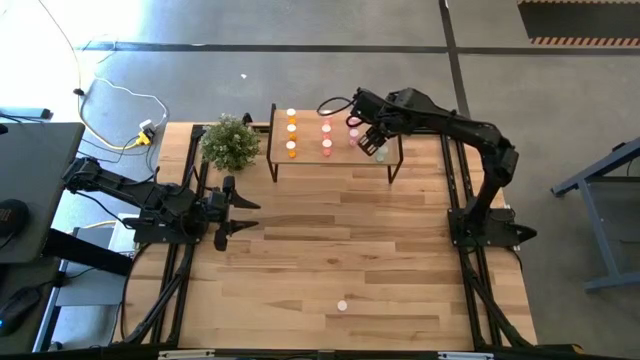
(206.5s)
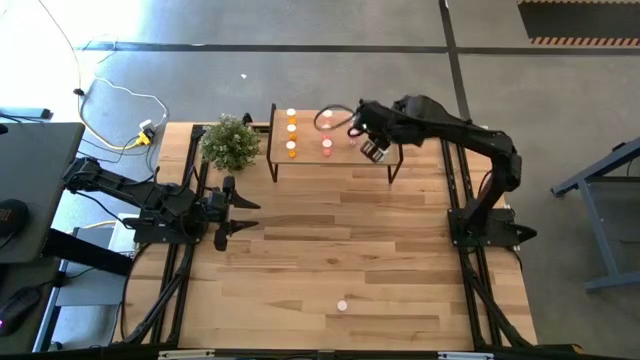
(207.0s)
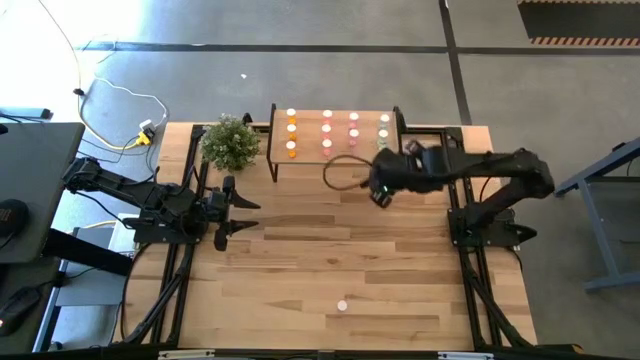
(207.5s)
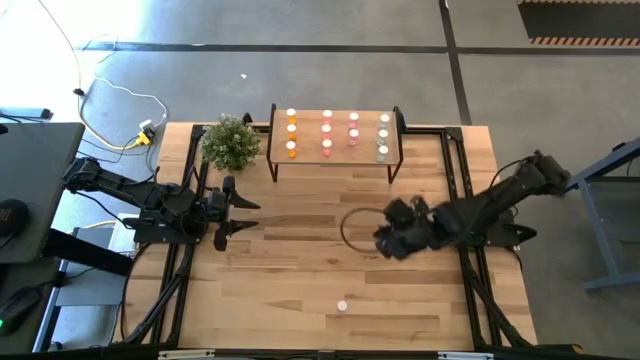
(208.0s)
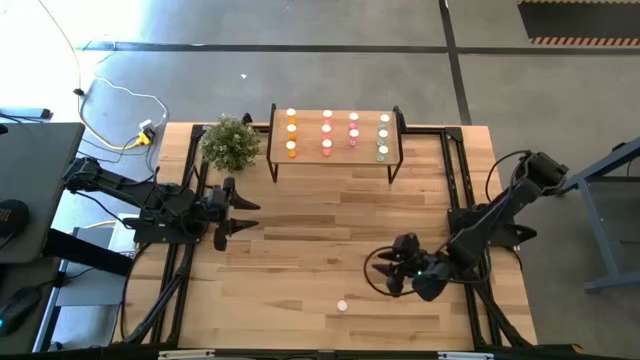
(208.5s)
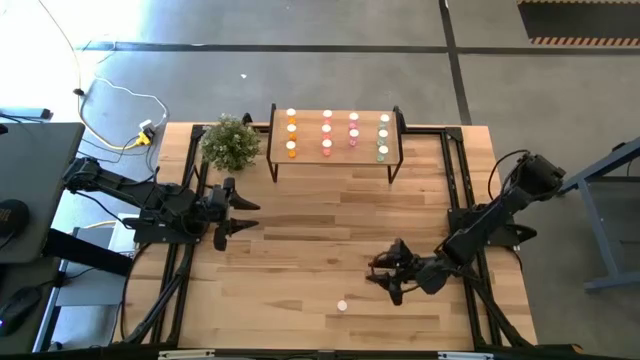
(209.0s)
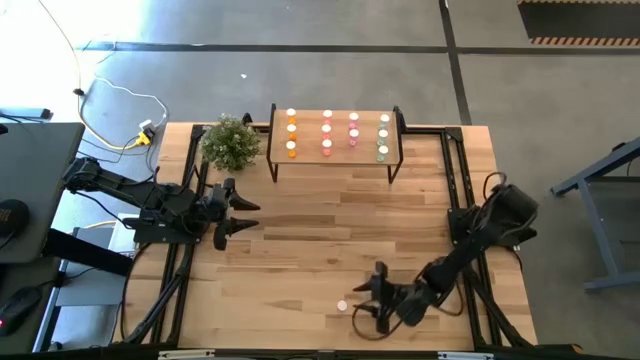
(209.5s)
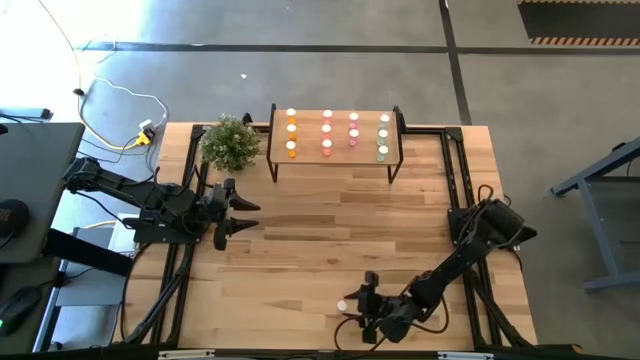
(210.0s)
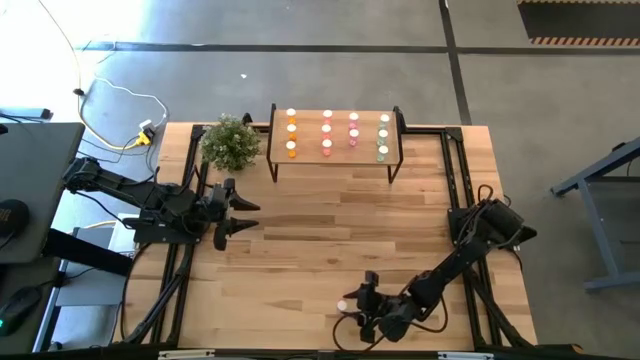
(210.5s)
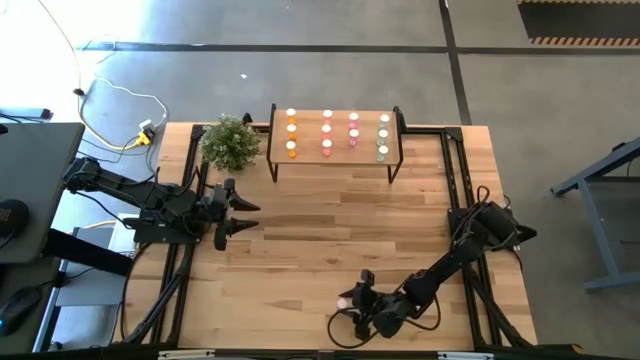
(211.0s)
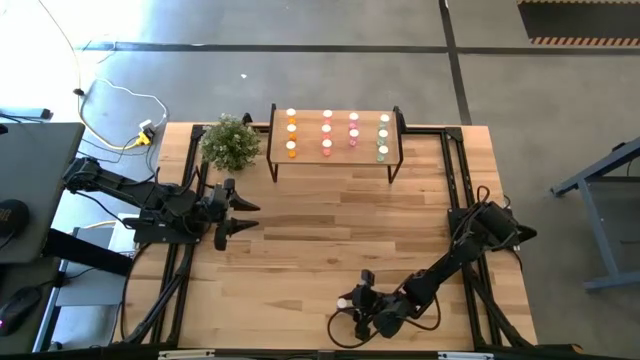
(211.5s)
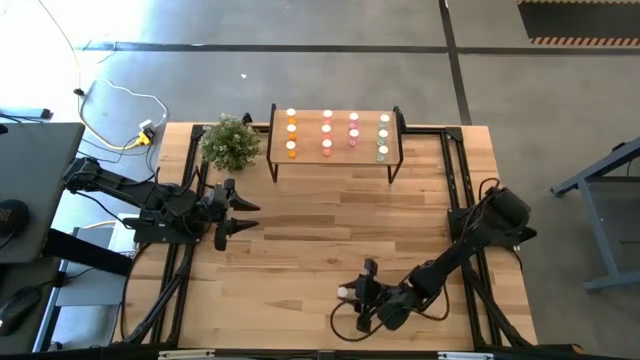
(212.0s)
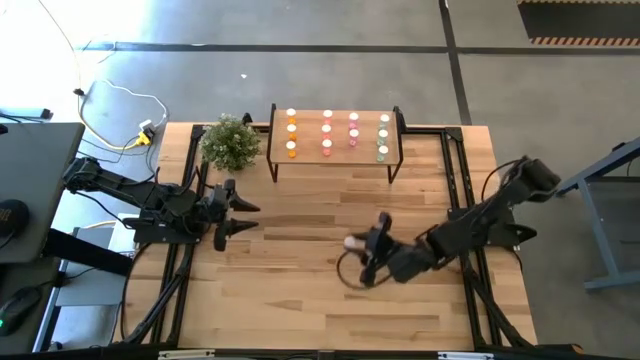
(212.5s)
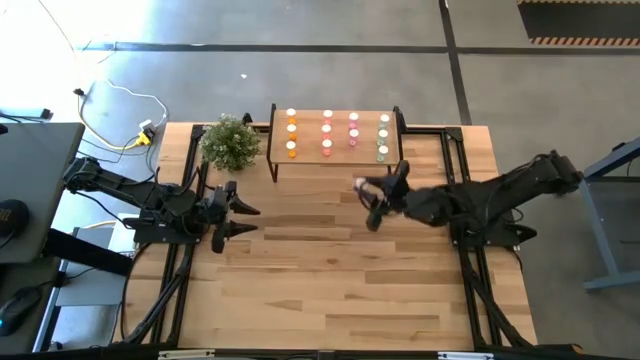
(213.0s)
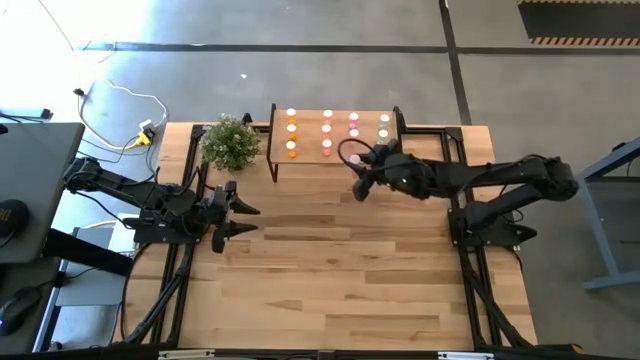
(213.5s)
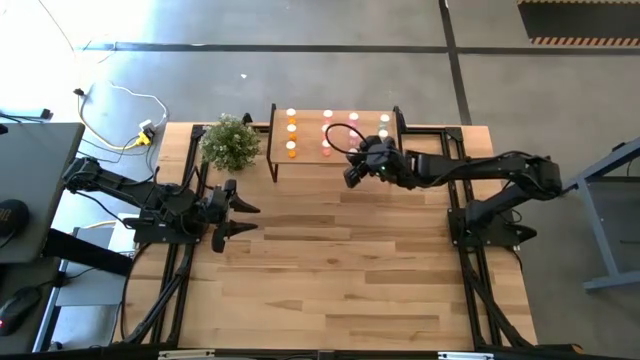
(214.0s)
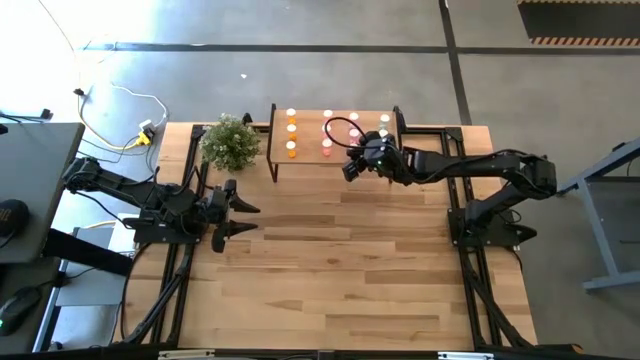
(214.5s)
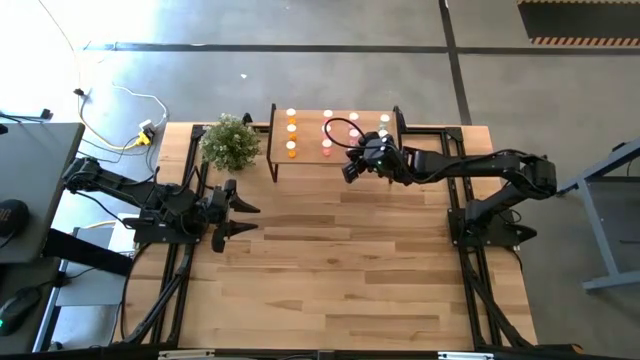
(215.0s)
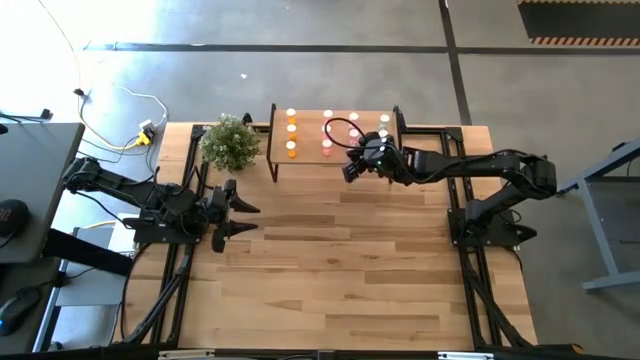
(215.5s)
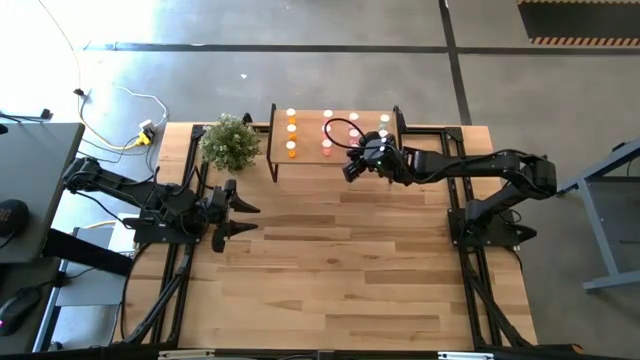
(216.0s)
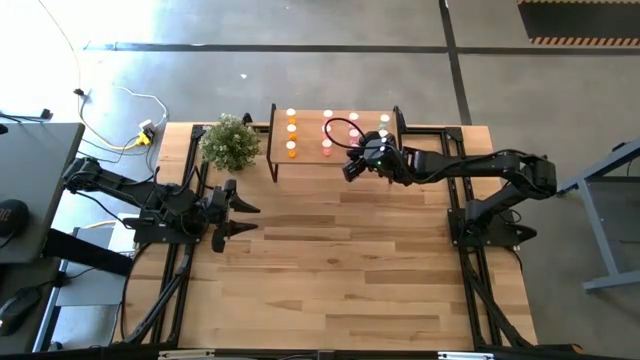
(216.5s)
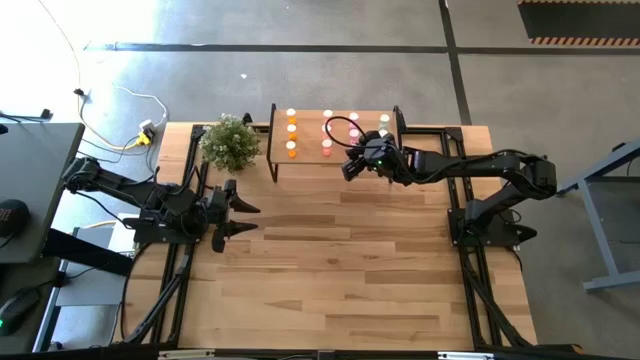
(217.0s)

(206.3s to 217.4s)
Task: Pick and place medicine bottles onto shelf by color
Put the purple pill bottle aligned with the other purple pill bottles on the shelf

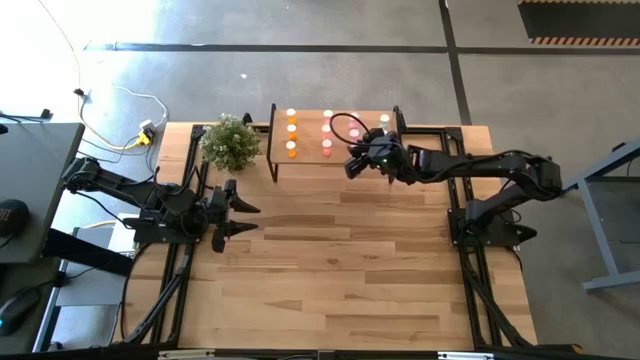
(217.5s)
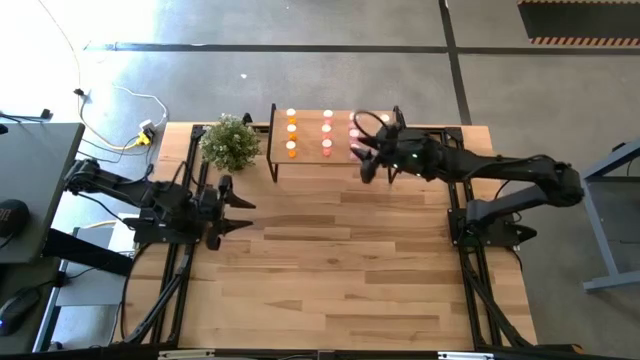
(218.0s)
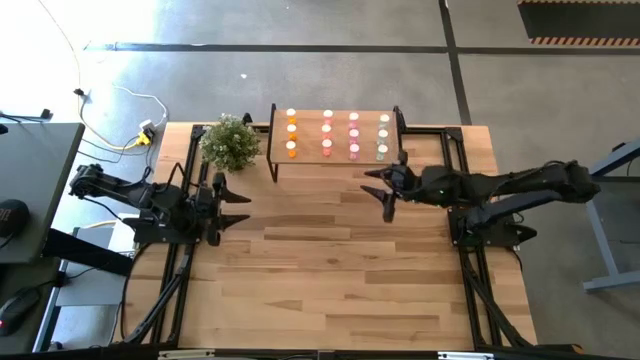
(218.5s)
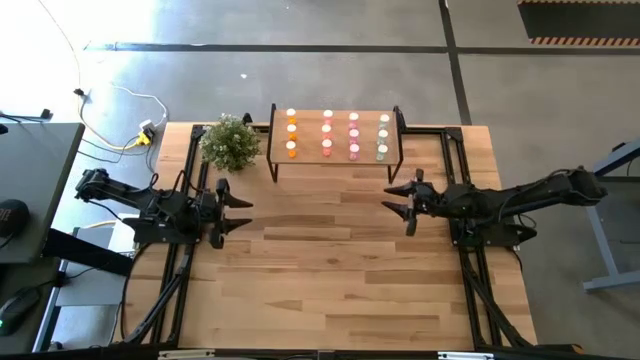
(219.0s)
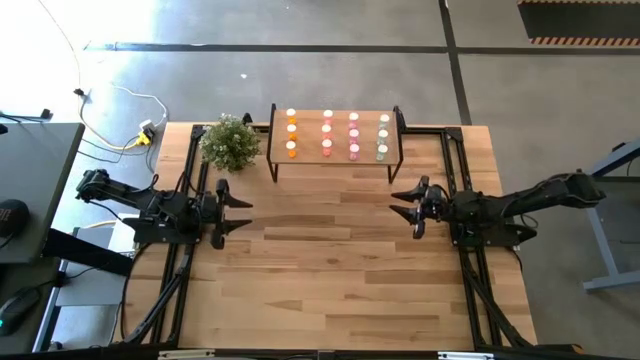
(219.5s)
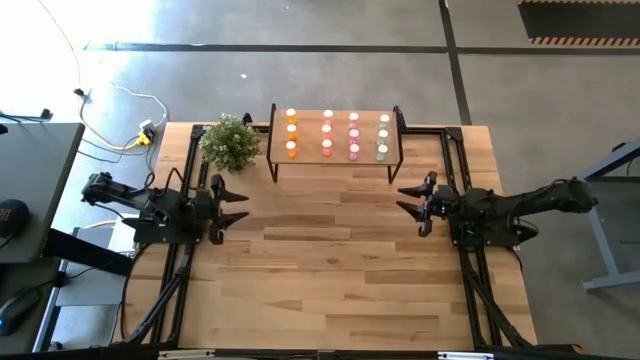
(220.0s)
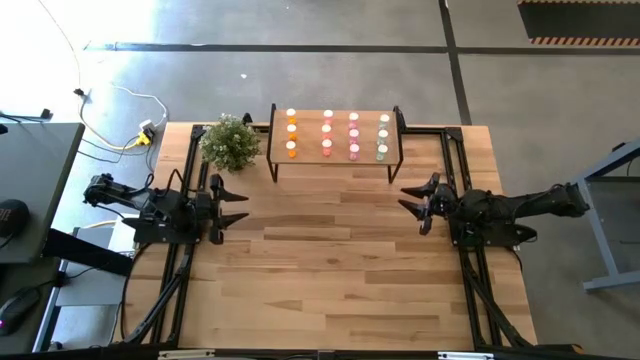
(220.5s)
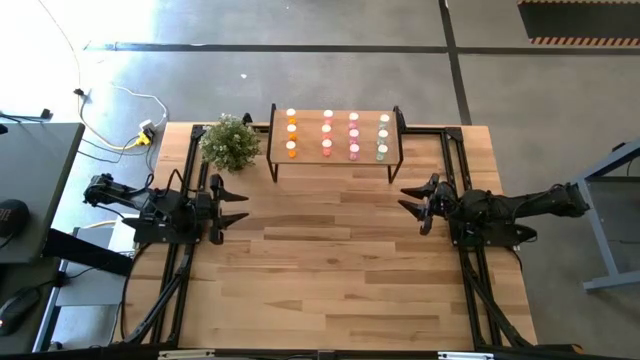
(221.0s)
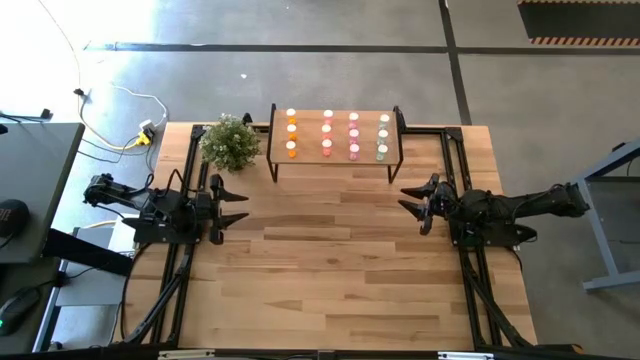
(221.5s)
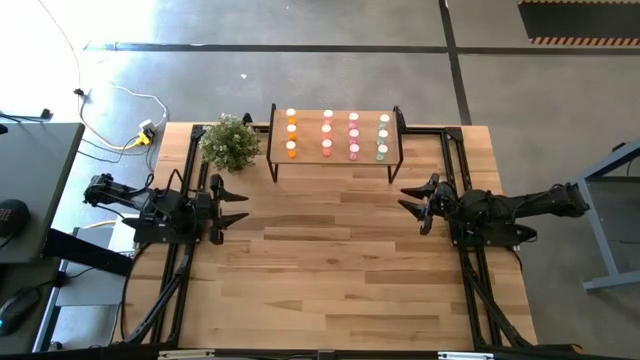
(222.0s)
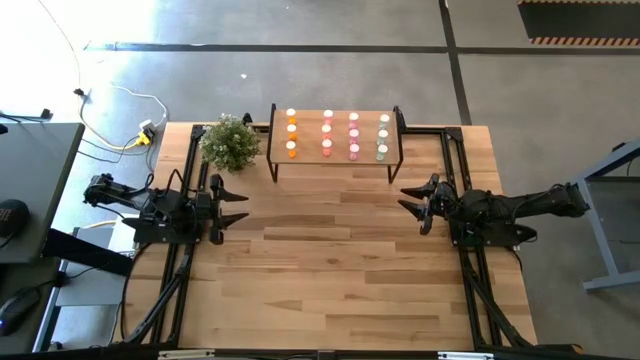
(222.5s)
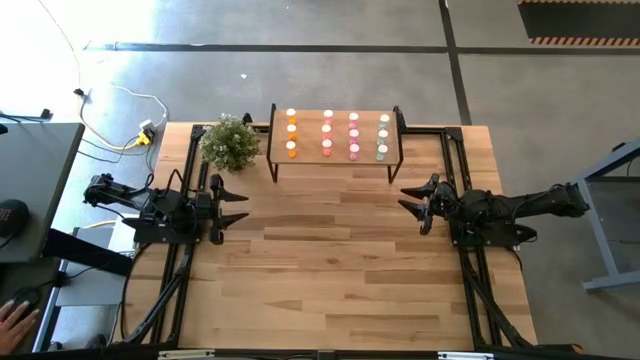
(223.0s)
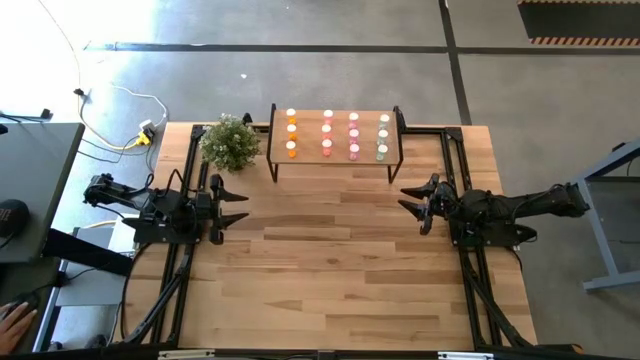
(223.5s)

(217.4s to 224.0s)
Return to Home Position

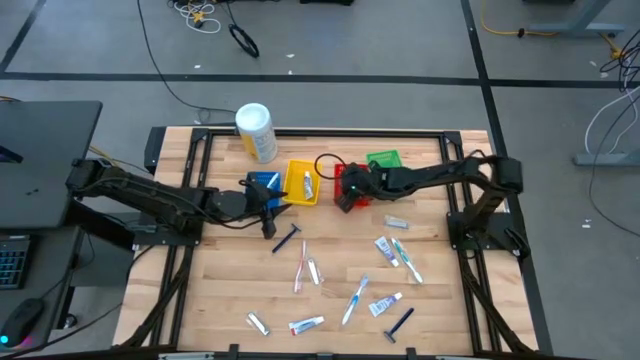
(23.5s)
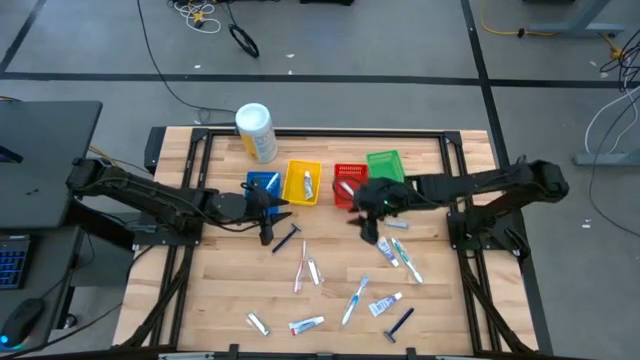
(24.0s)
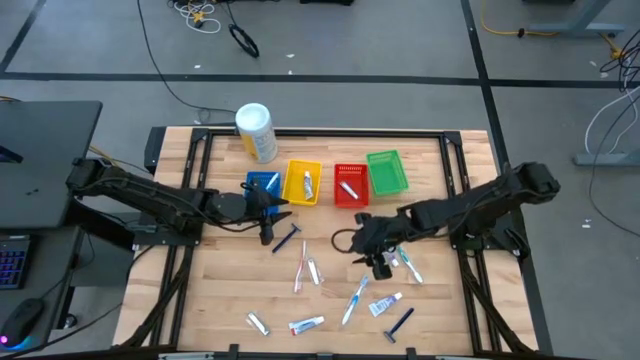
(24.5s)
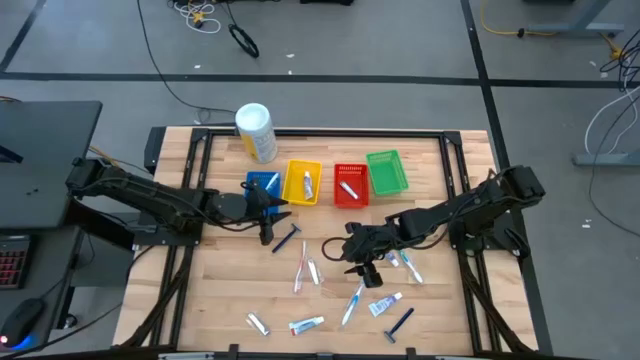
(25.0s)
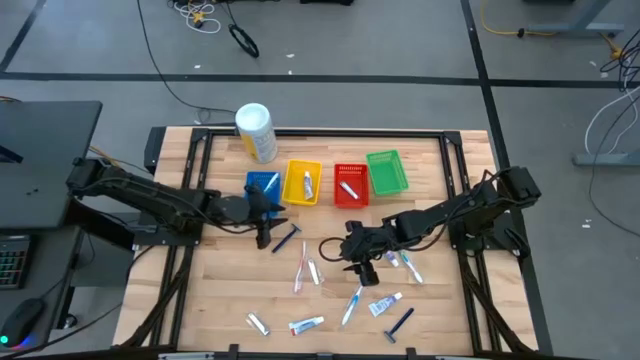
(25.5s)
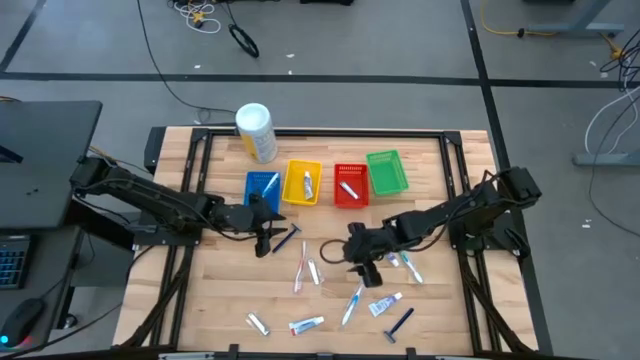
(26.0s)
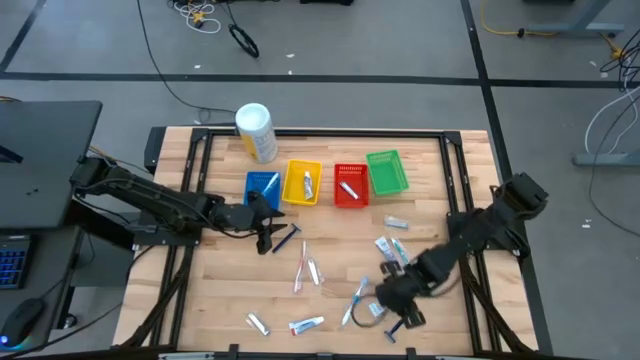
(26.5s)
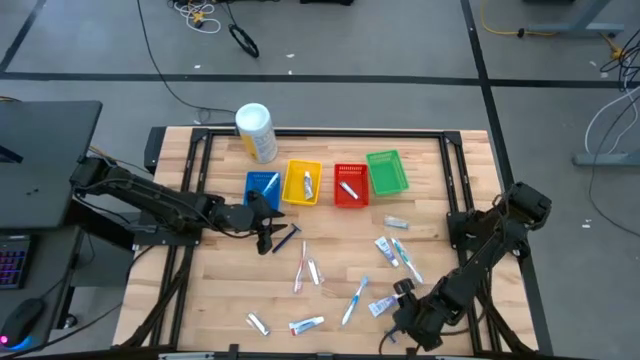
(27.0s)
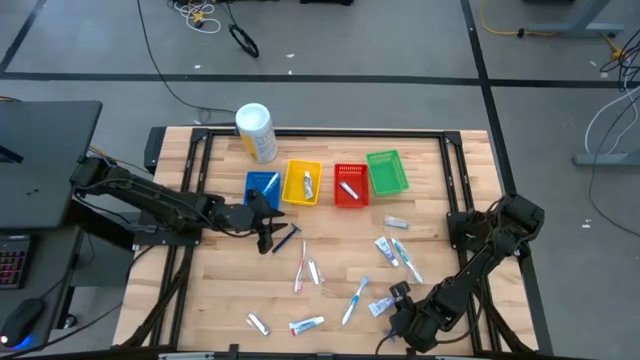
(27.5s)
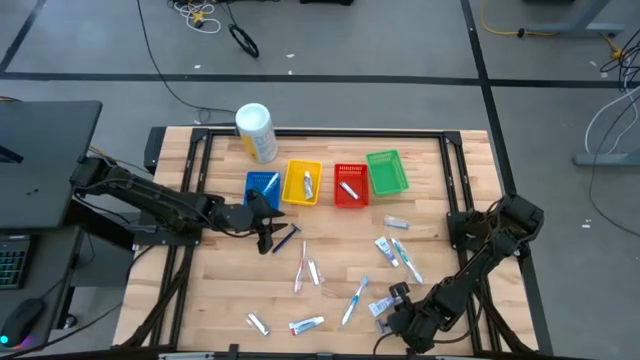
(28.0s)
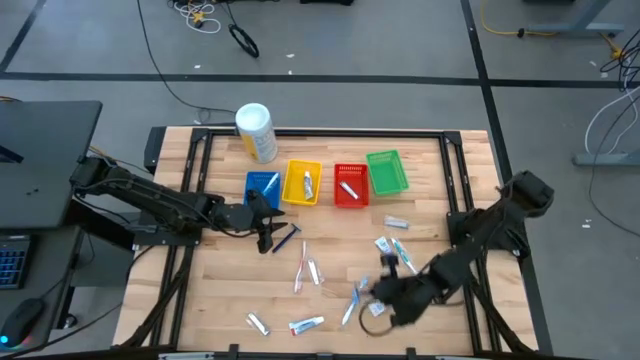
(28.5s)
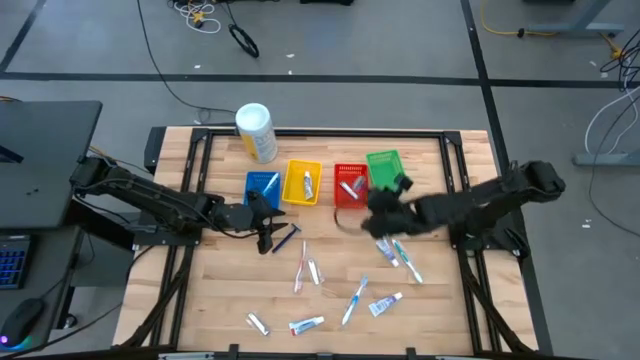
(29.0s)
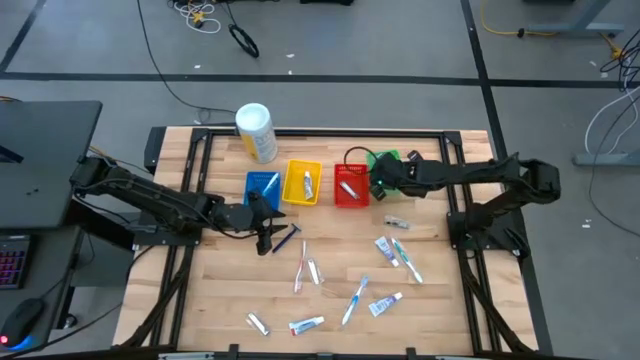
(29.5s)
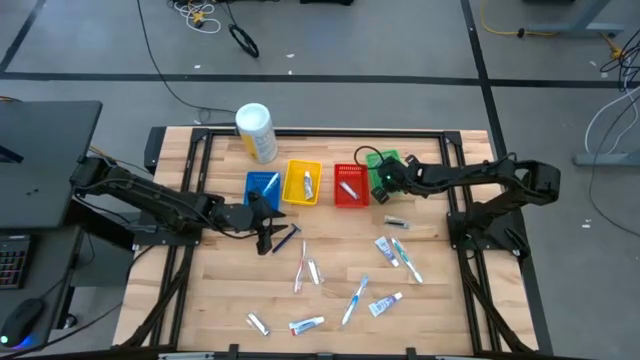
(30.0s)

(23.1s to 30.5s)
Task: Pick & Place Travel size toiletries
Put the blue razor into the green bin
